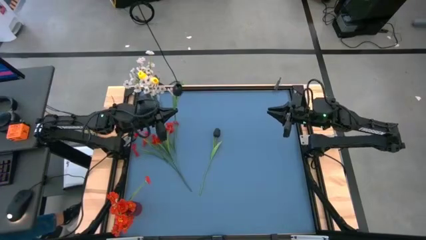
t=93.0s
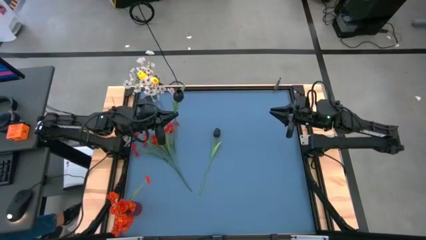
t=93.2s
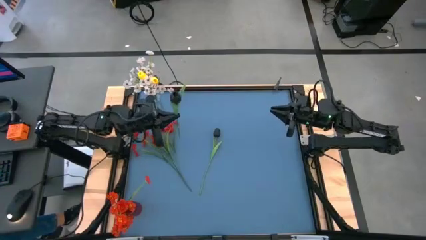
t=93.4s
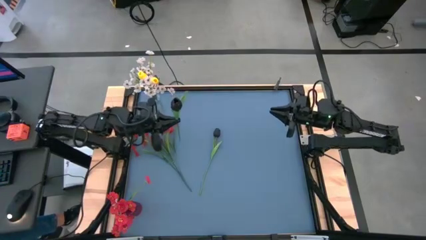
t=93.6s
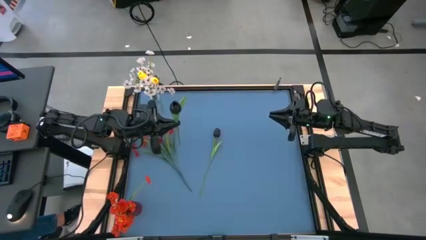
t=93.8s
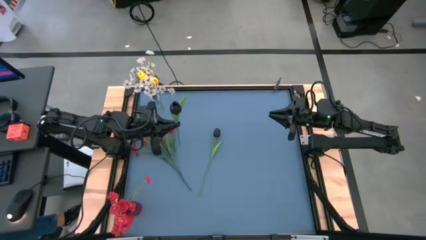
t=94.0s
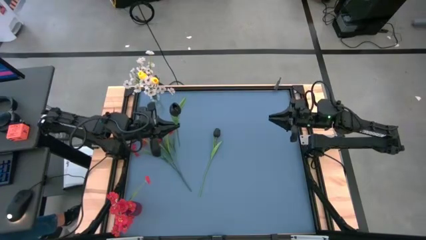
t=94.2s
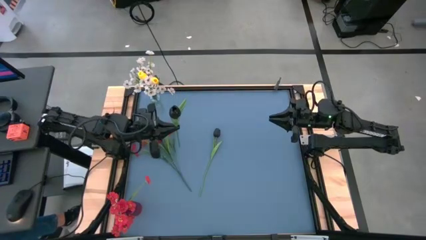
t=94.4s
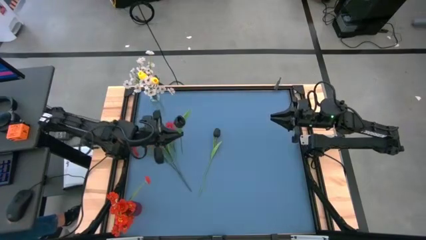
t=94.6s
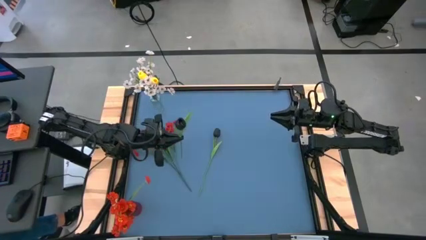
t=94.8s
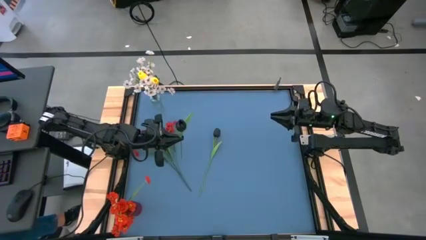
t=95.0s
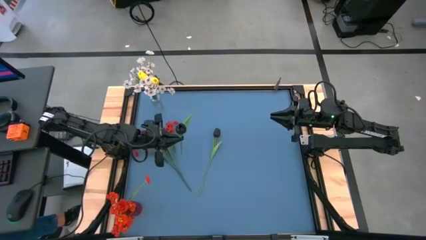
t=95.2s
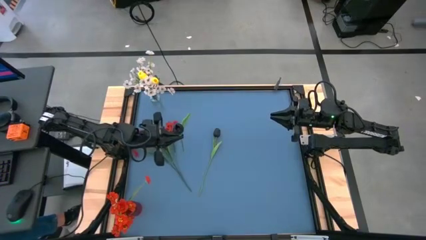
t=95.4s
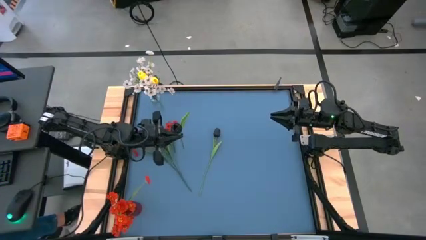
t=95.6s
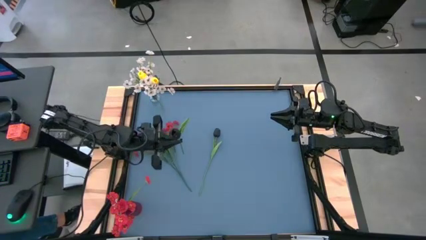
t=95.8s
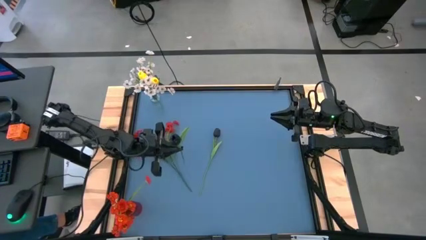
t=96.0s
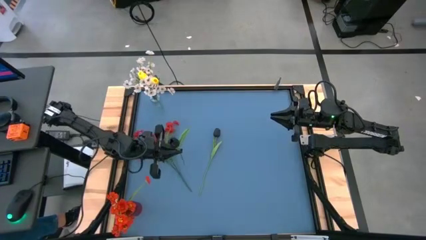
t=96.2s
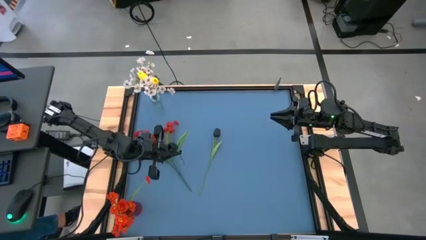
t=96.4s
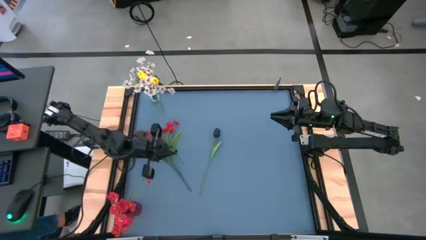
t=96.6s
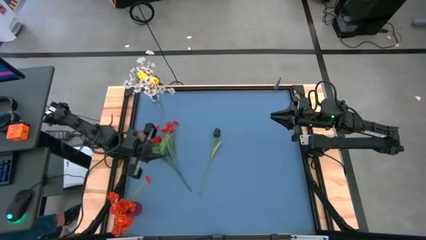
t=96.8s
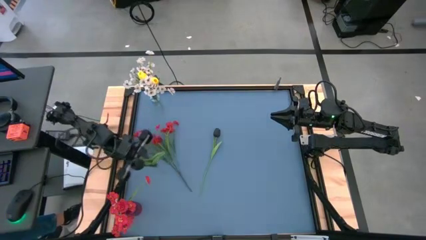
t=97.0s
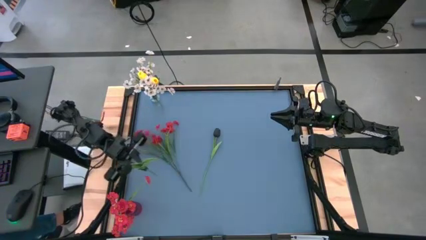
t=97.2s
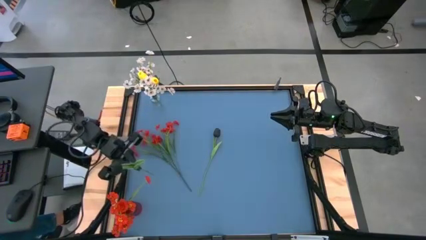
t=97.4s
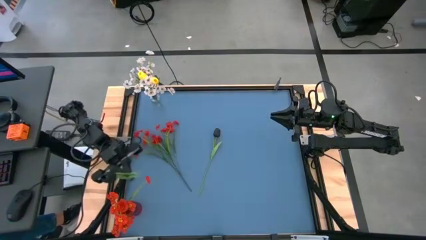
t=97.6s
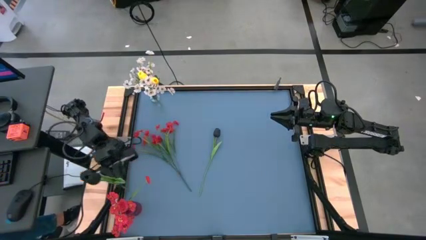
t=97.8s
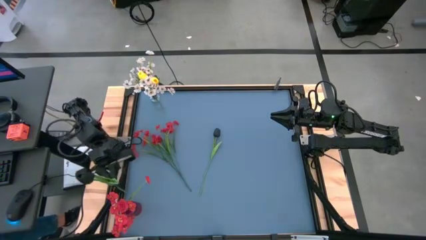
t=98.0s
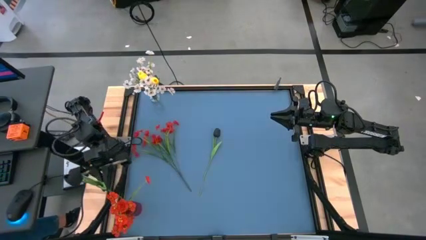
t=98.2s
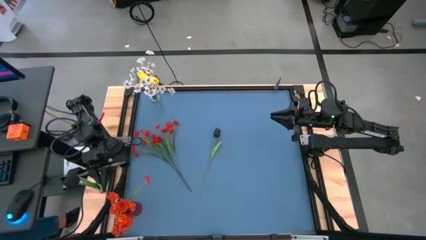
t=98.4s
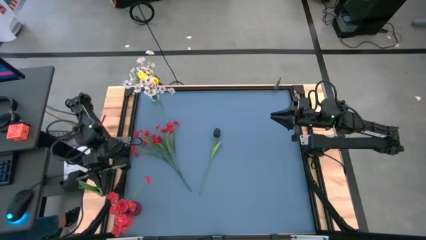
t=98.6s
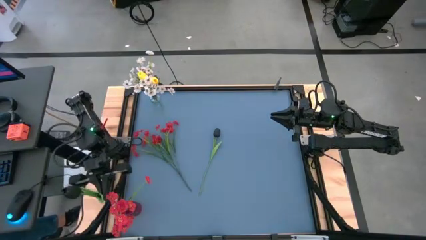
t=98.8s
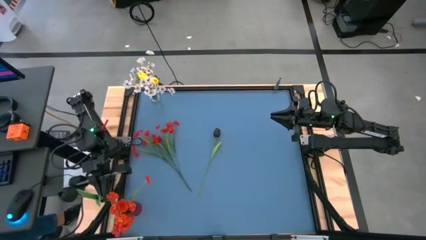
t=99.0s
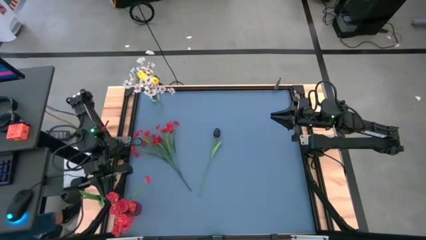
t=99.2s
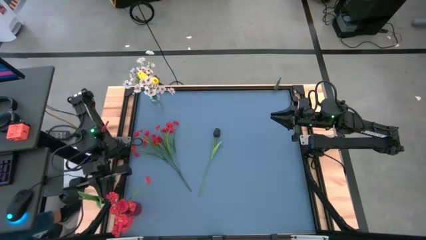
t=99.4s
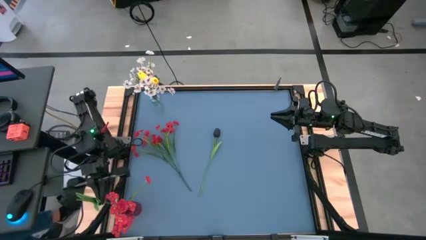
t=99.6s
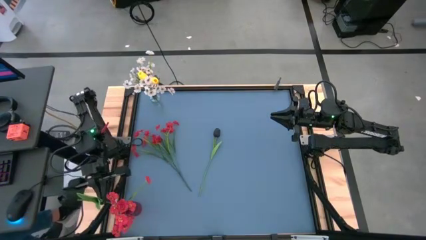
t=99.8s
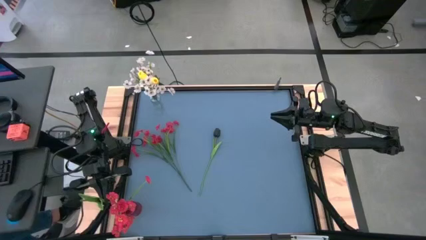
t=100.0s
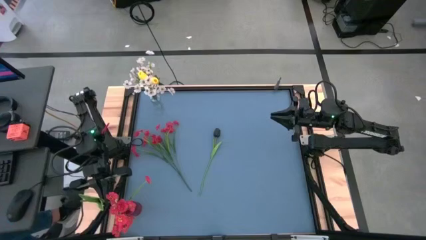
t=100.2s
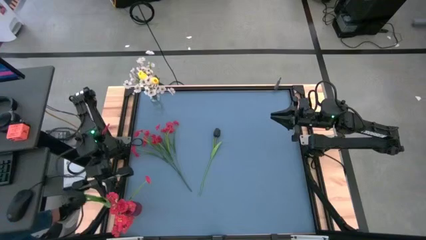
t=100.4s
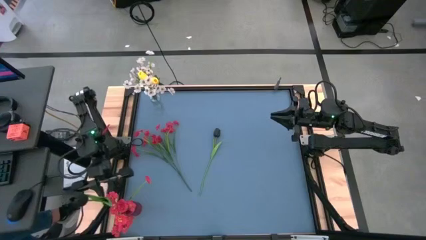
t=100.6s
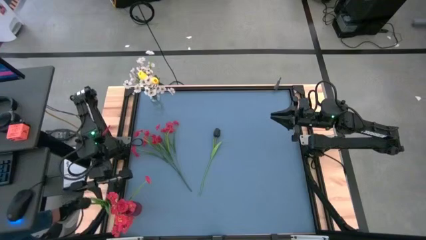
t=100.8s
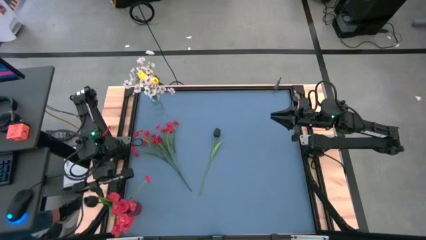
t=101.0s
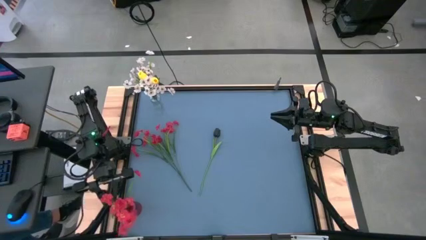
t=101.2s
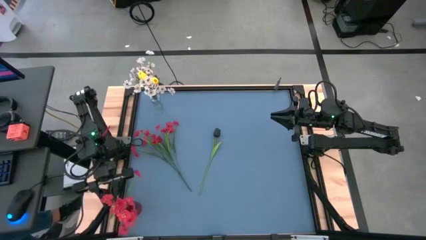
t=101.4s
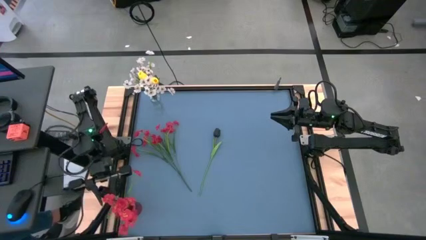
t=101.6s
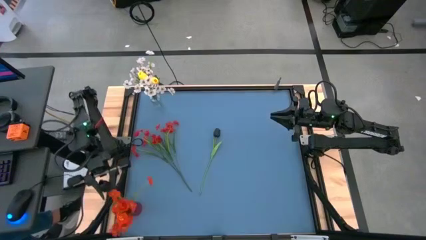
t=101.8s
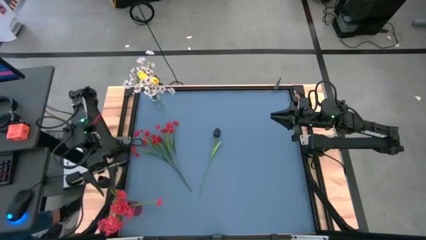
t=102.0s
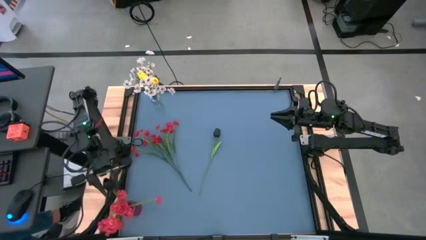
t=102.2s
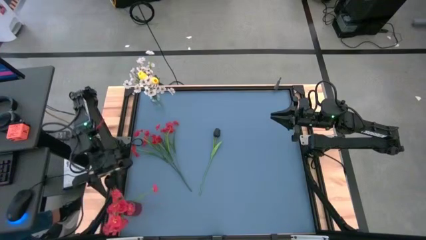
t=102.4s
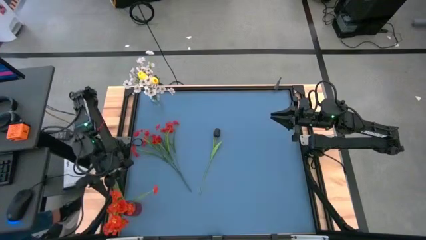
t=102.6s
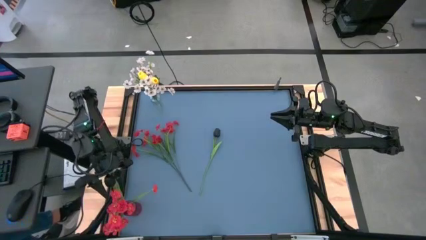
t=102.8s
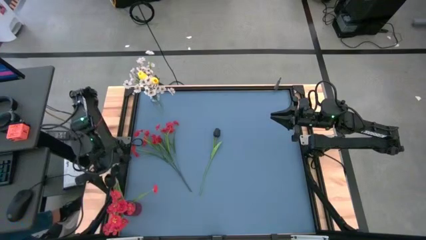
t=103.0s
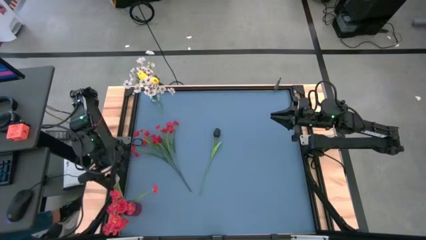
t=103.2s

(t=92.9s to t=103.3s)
Task: Sort flowers into vase by color
Put the top black flower into the red vase

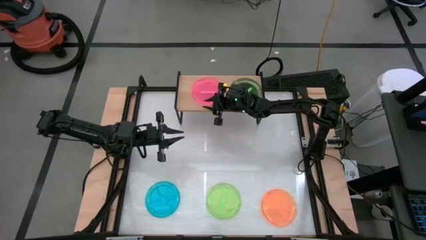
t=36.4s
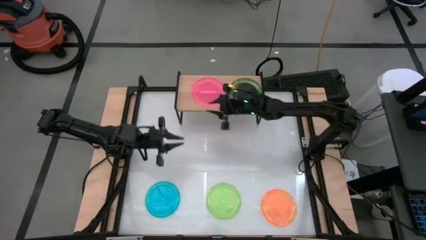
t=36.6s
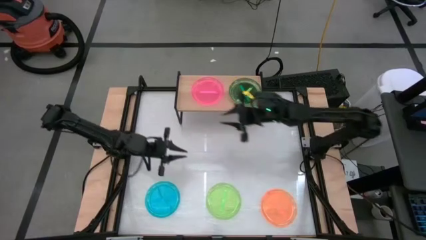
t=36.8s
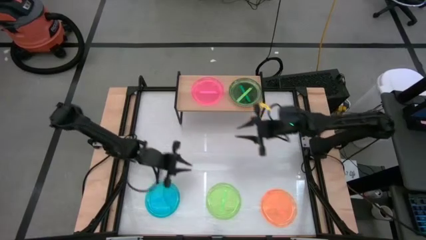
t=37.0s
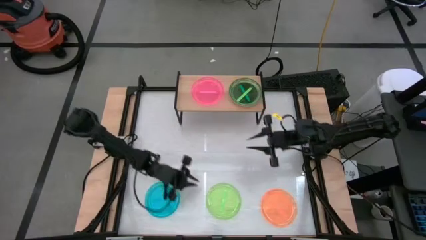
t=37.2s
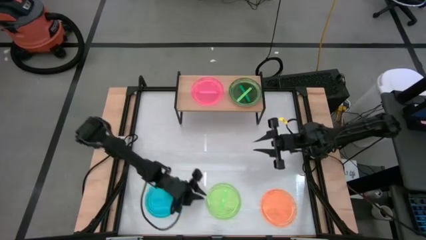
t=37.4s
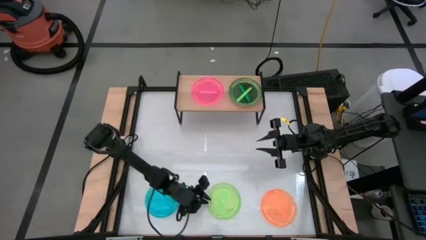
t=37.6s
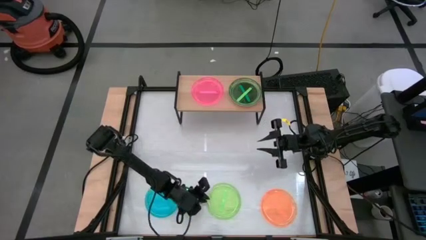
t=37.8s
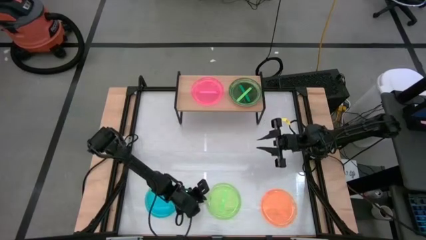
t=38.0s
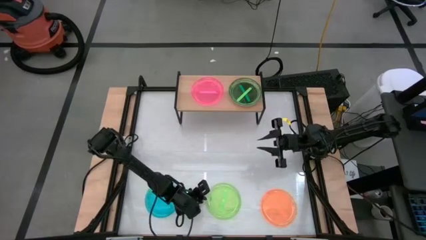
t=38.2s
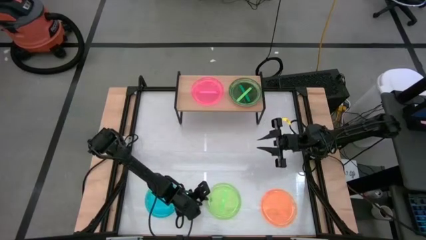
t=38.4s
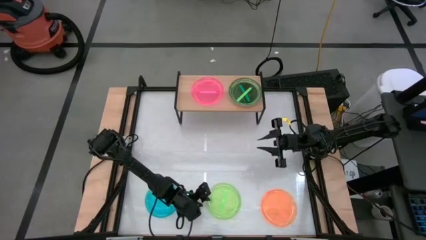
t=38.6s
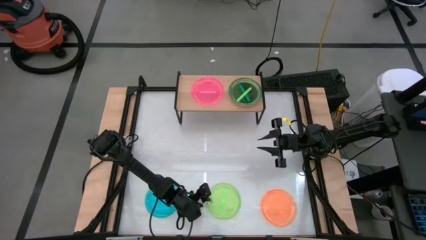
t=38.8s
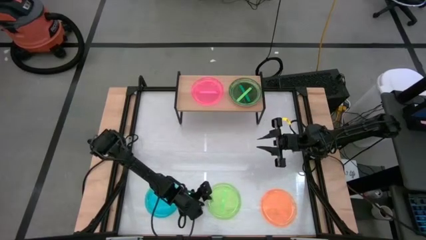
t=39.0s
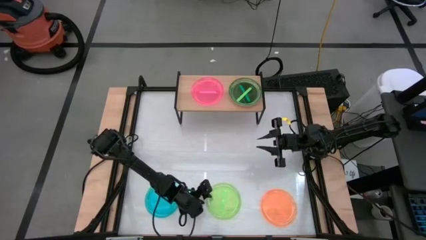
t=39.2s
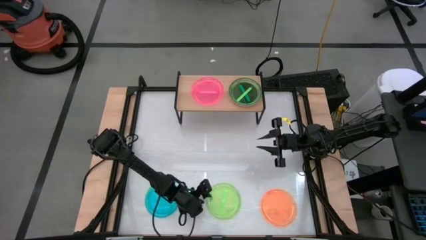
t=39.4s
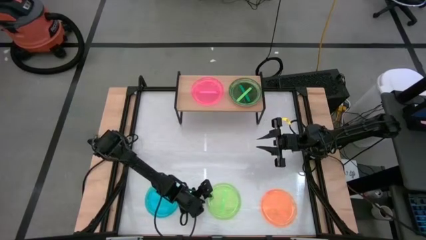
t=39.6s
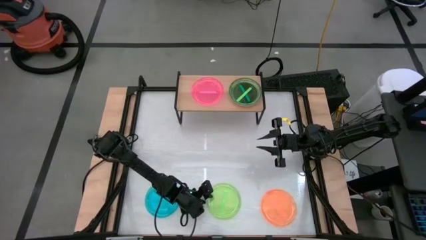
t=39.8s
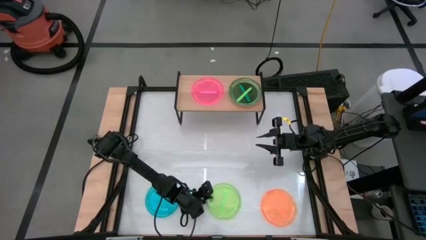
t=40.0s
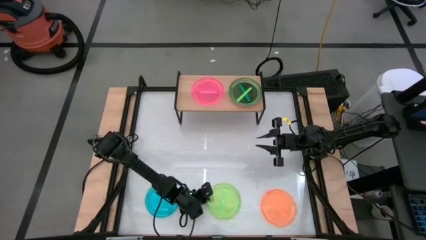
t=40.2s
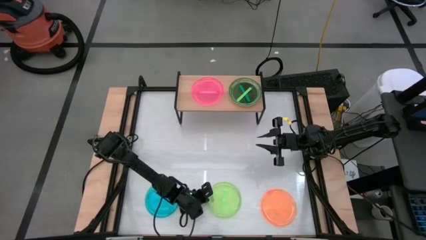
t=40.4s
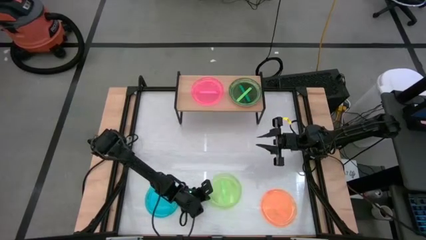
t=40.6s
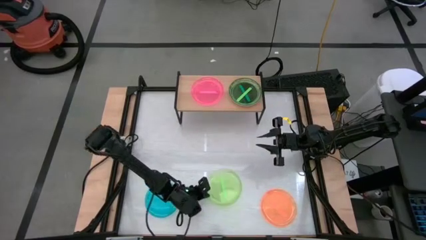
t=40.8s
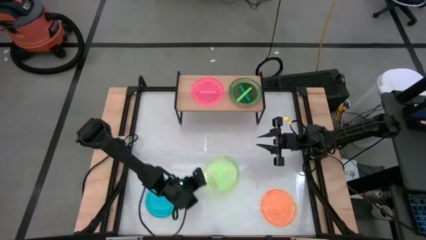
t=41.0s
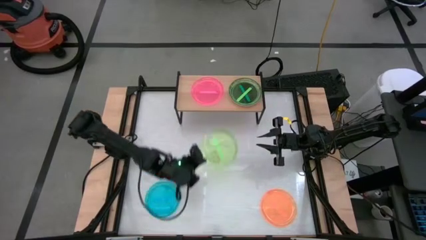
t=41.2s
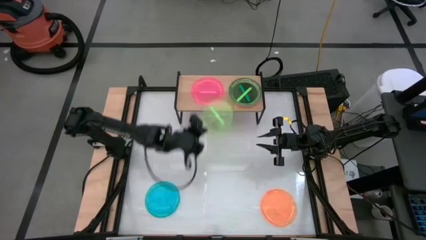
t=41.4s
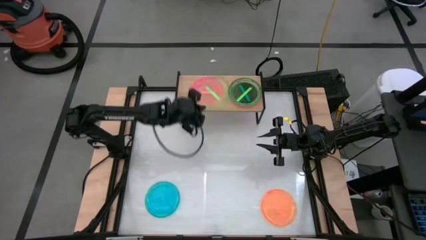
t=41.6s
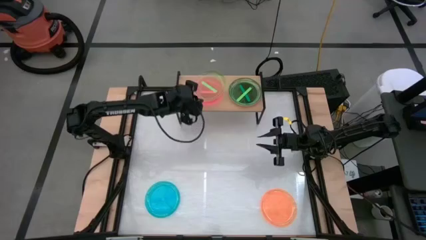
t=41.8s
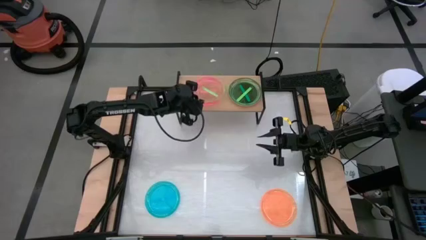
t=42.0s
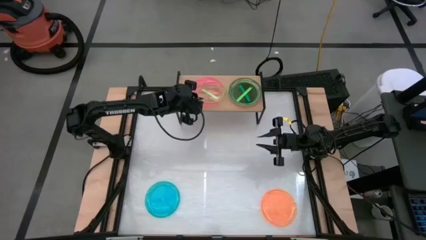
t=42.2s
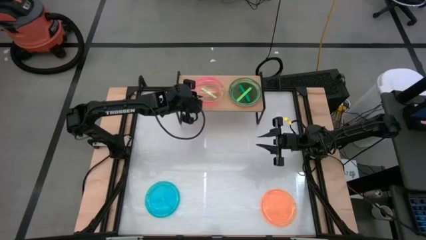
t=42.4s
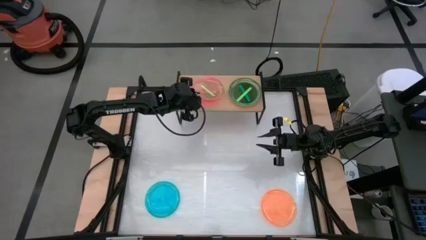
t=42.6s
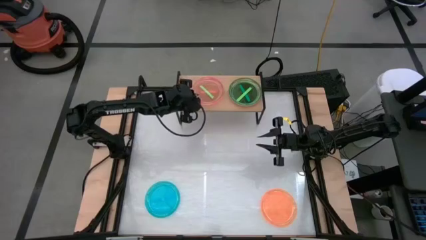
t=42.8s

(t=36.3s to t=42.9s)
Task: Place and stack plates onto a shelf
Stack the green plate on top of the pink plate on the shelf
